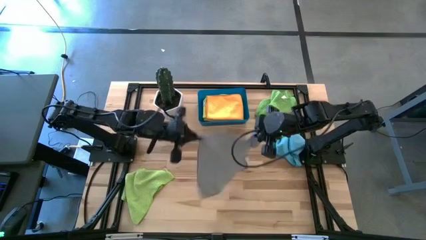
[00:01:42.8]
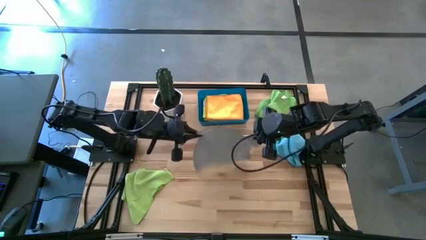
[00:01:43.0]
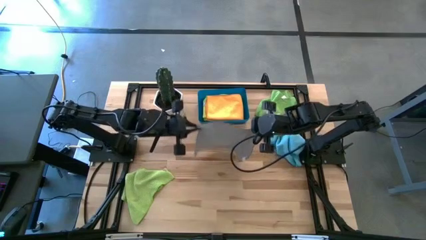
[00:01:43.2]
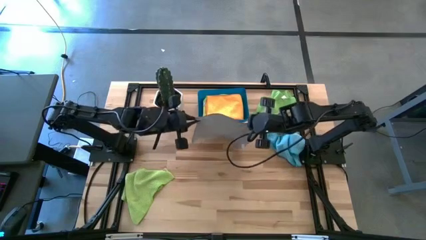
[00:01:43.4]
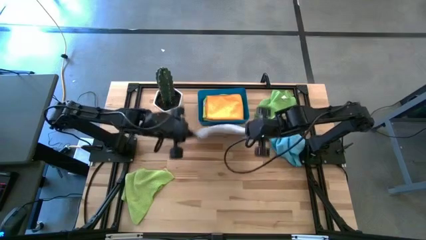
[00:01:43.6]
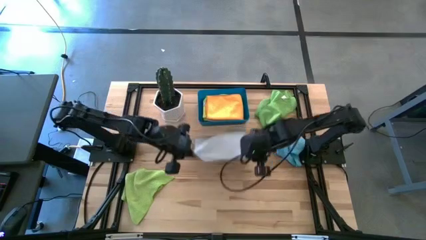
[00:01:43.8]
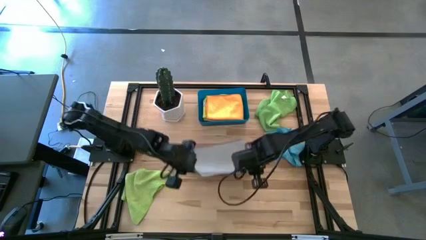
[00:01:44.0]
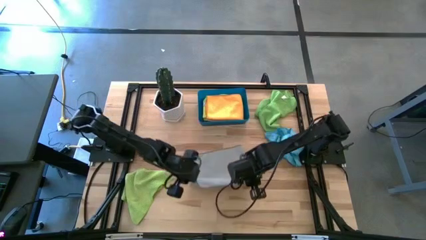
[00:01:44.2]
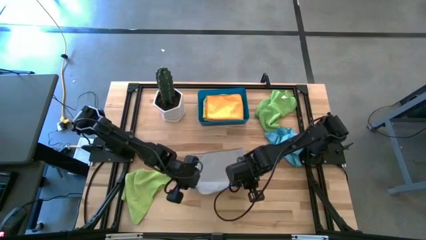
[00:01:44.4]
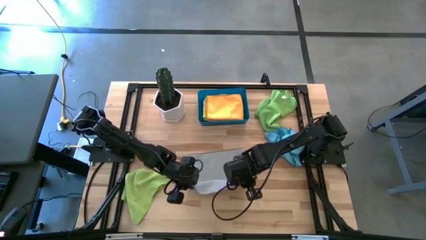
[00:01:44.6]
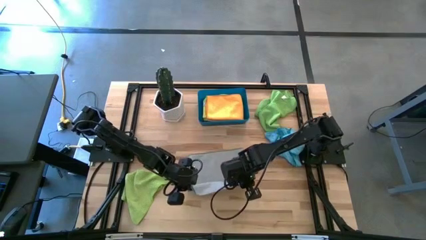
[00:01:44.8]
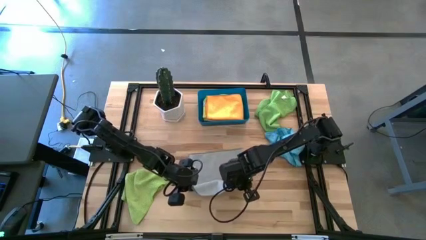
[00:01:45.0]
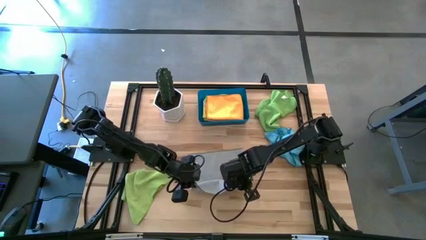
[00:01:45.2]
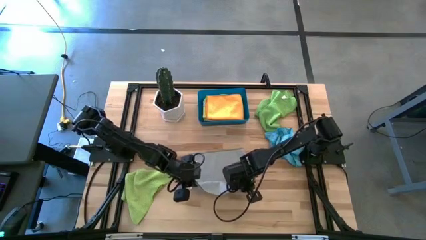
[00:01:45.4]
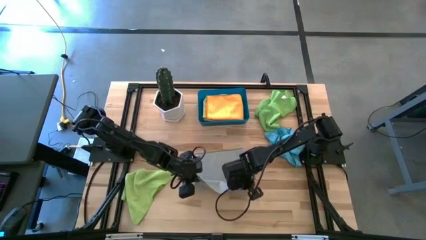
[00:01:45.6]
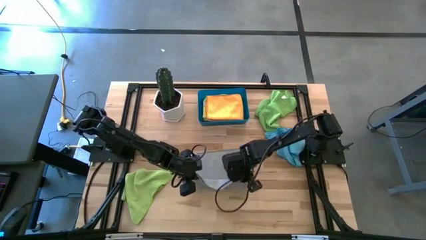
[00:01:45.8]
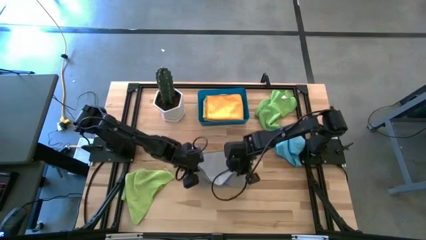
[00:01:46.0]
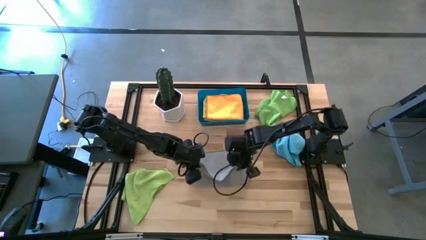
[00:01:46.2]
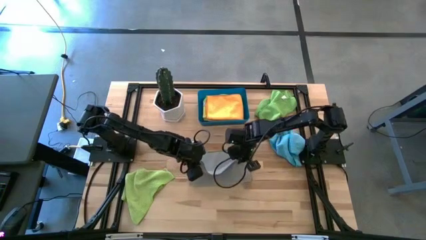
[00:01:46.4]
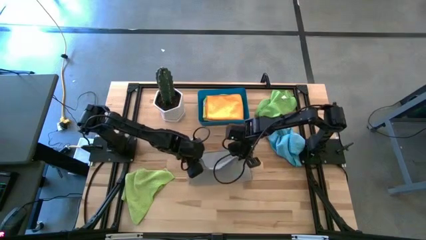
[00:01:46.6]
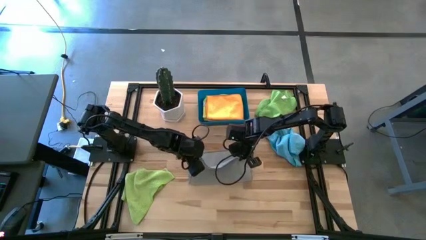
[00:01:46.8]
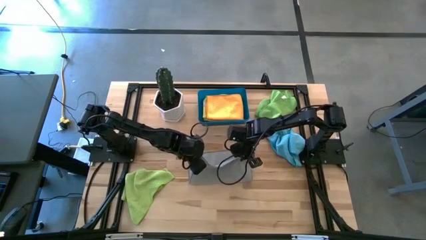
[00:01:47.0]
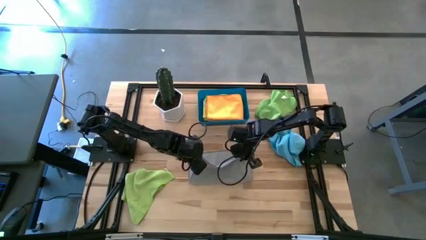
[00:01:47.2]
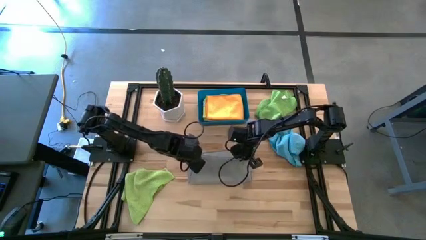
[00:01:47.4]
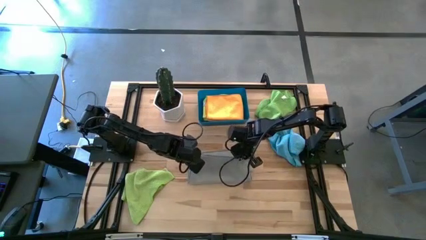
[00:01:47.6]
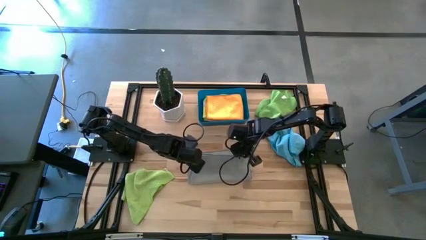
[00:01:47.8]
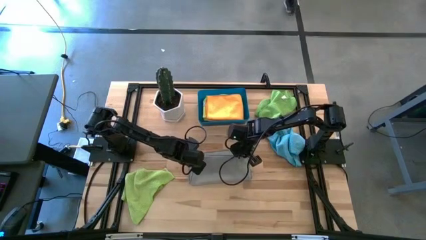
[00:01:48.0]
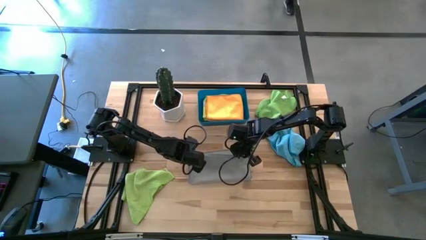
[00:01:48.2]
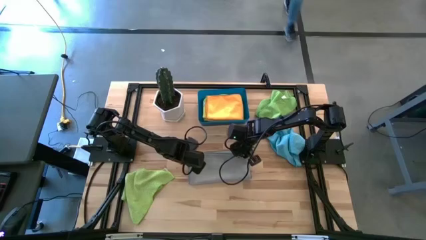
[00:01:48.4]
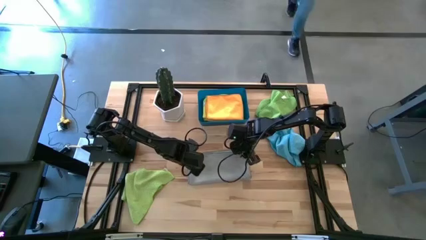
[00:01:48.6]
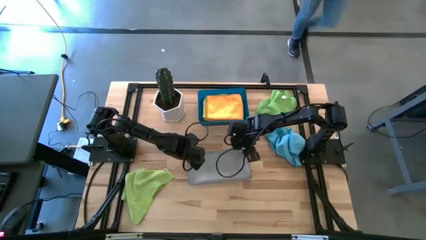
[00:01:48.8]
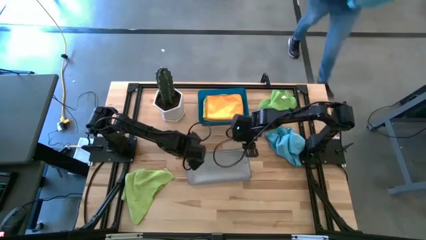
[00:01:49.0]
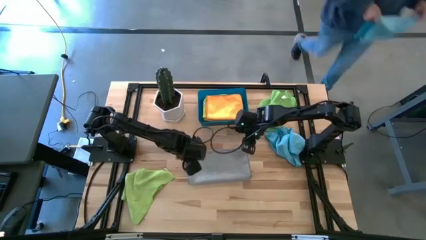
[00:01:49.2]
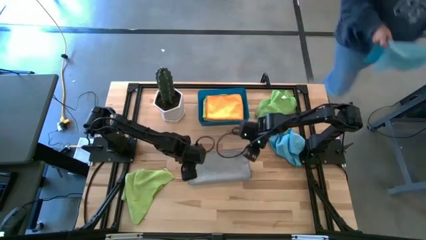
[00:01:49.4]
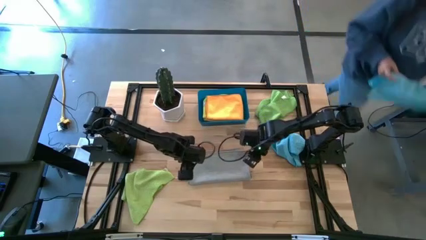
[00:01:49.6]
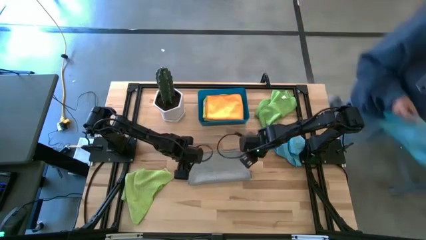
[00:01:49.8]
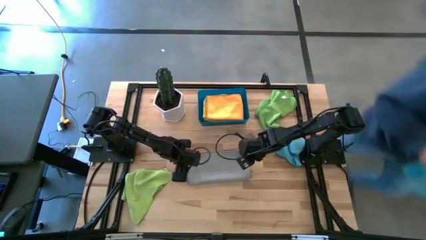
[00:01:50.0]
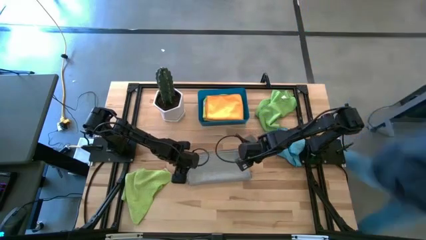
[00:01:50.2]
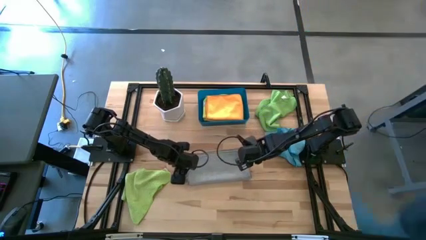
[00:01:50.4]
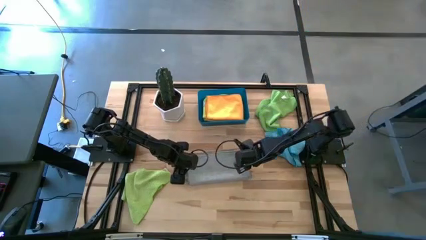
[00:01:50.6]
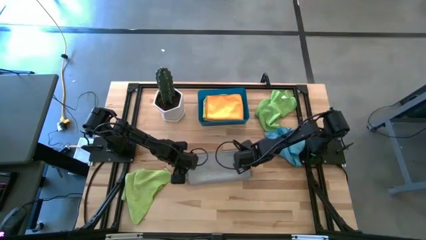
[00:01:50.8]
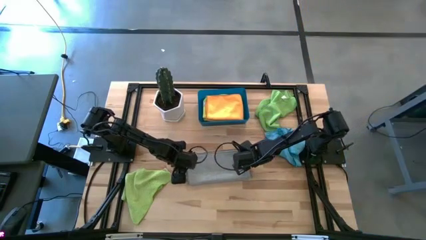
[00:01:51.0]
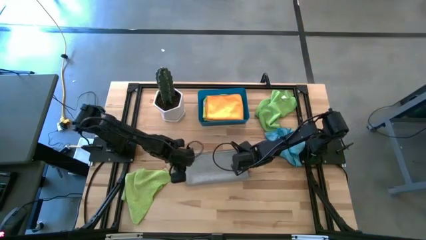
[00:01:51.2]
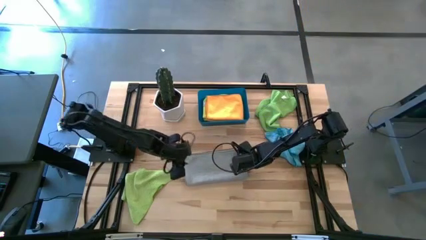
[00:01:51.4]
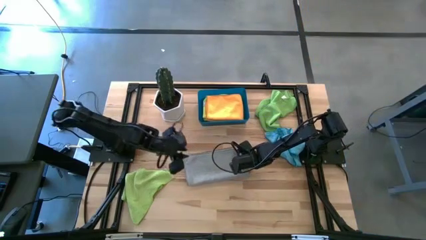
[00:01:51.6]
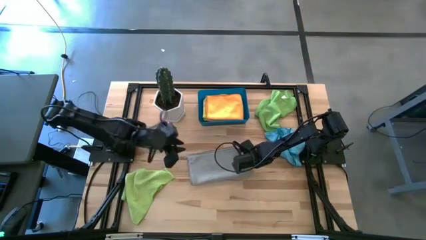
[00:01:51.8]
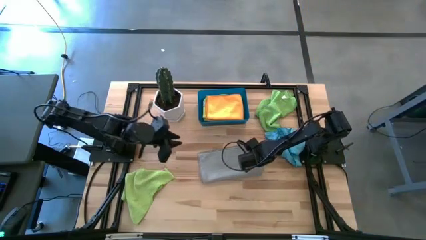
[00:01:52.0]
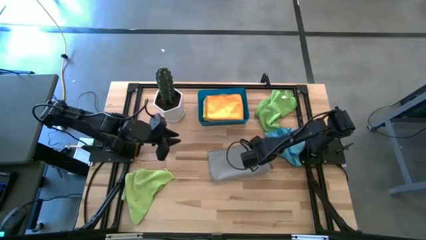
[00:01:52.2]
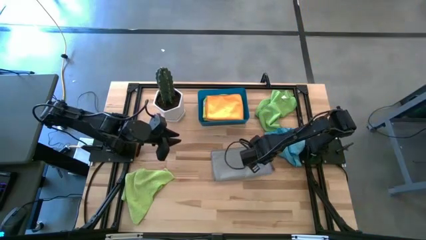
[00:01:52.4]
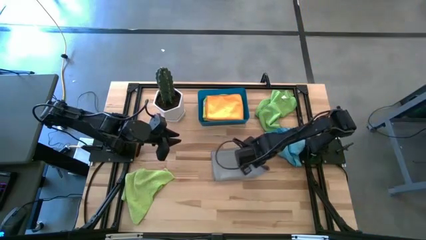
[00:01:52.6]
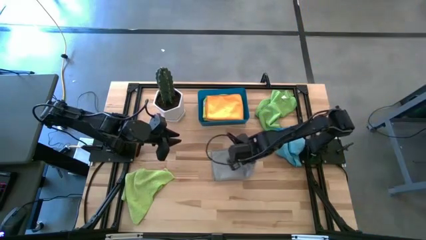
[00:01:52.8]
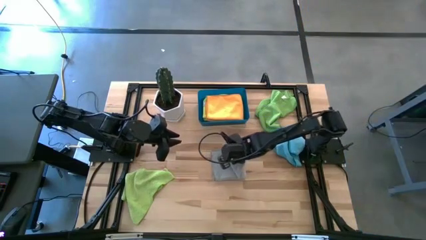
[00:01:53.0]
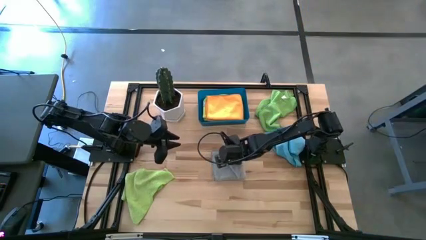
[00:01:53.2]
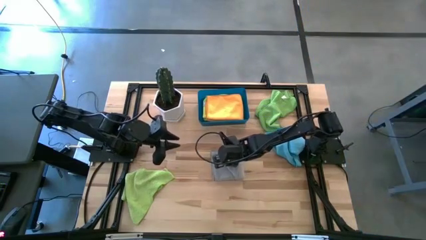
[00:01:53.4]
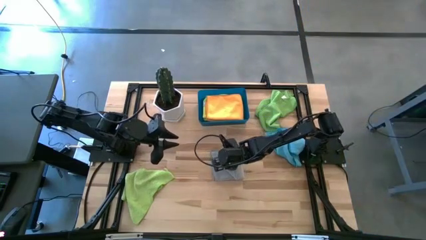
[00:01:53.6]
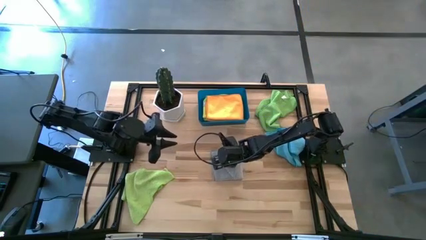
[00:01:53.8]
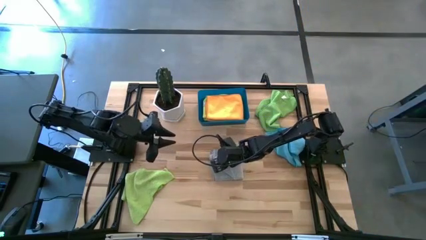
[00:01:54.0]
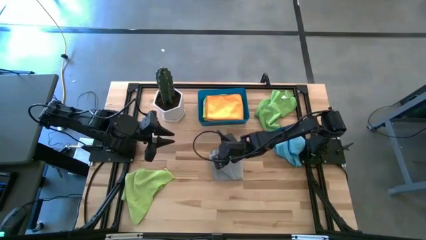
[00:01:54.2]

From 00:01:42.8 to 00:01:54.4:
Task: Fold microfiber towels
Fold the gray microfiber towel

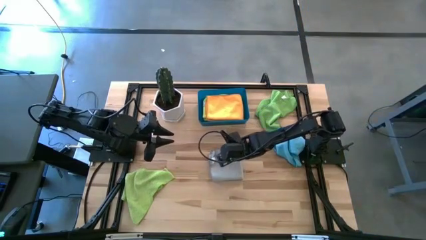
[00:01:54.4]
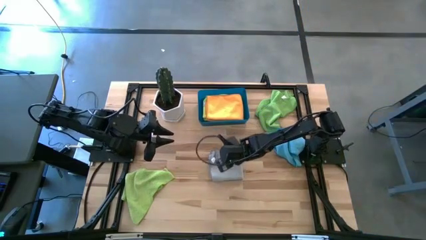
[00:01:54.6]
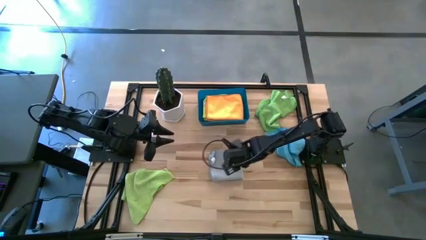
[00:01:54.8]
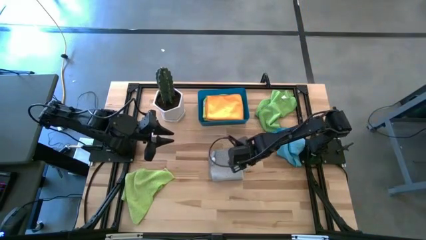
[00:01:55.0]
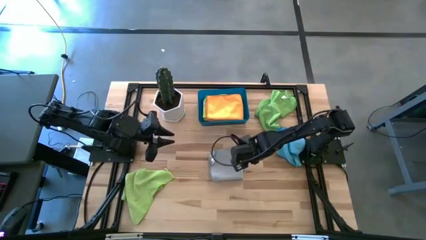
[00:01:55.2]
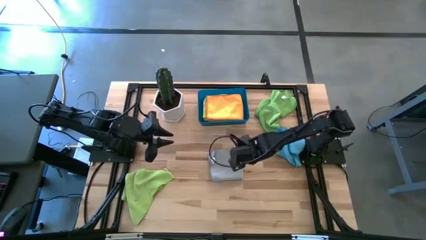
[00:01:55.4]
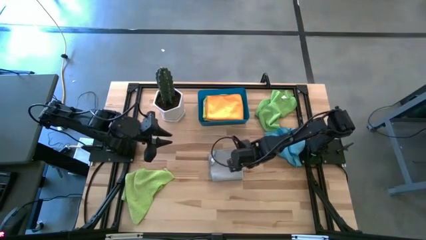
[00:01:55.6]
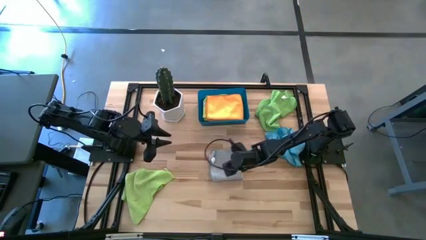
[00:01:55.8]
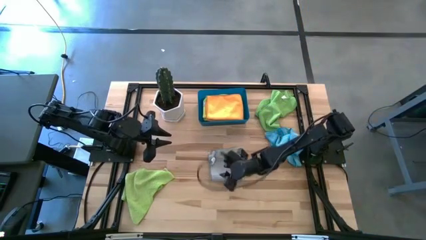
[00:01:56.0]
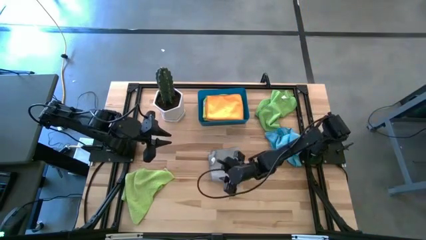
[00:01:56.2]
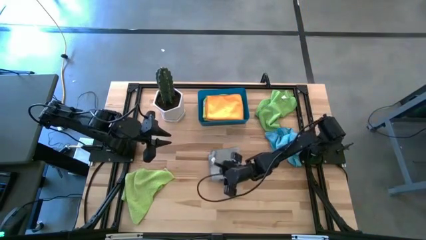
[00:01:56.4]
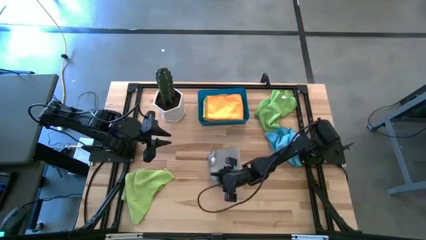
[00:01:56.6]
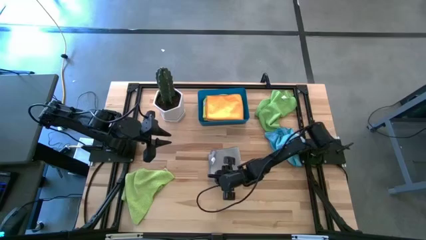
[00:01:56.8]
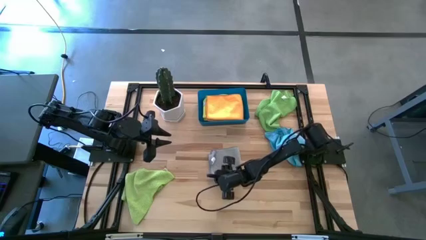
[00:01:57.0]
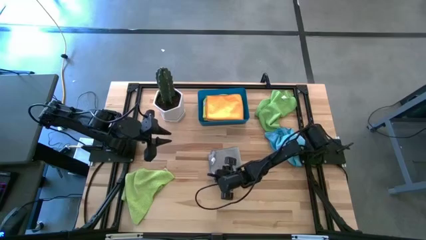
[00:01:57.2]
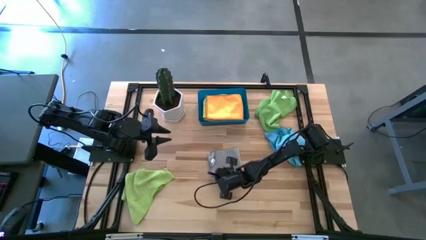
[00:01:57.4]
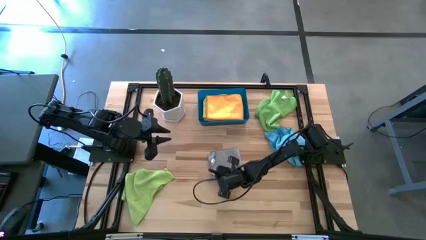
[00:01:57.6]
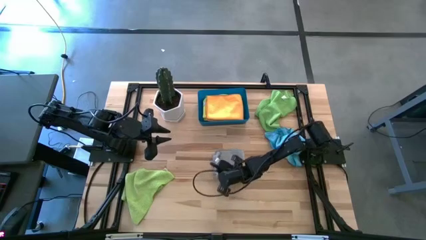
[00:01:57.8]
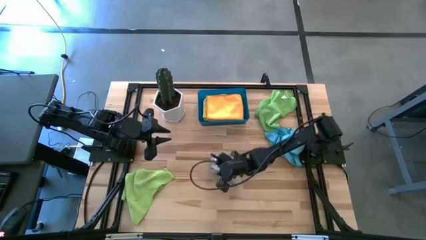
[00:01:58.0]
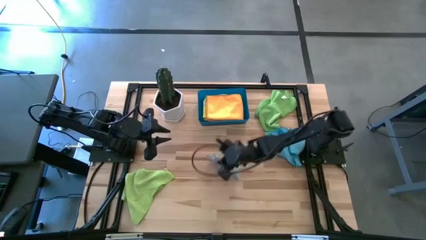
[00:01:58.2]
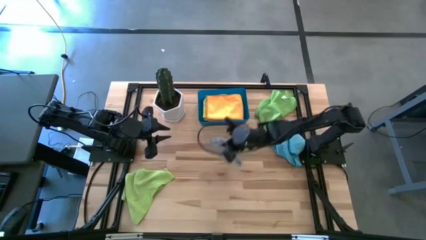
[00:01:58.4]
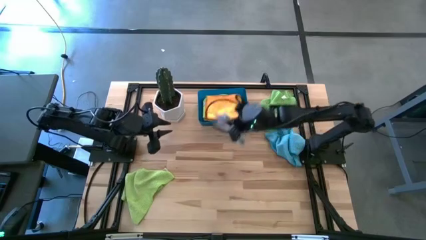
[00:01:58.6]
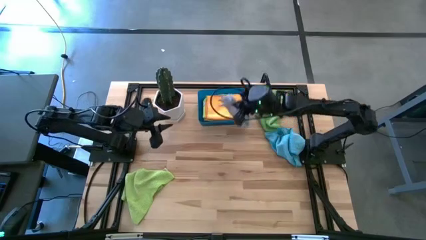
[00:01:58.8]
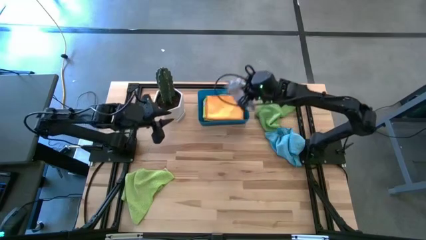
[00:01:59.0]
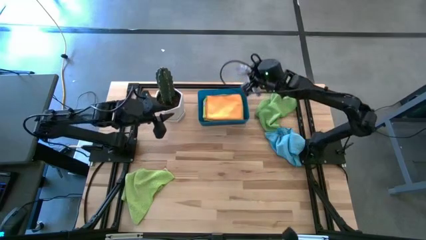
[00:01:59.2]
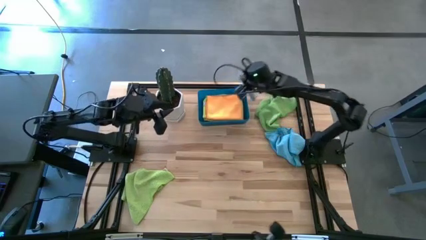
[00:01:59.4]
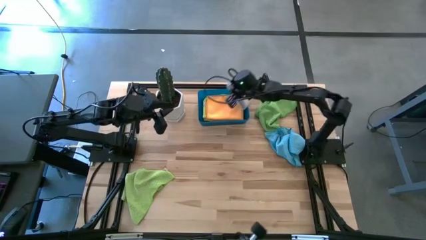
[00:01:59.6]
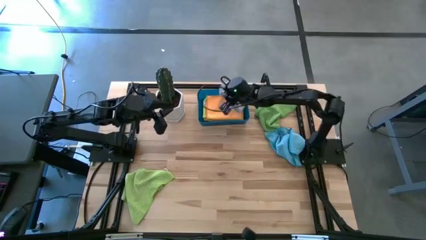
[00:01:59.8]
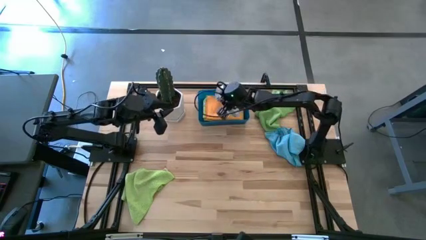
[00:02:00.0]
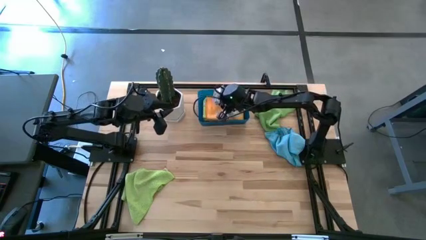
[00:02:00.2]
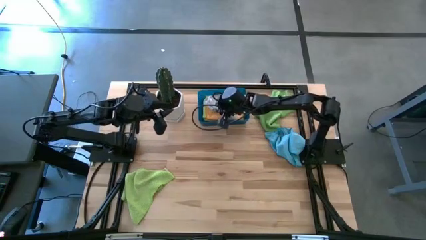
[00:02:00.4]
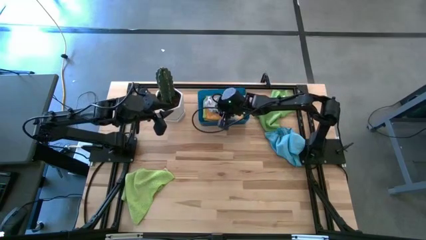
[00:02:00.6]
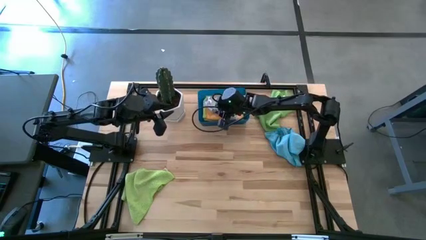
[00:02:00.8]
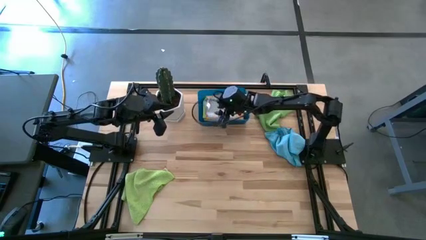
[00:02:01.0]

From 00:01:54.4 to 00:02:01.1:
Stack the gray microfiber towel on top of the orange microfiber towel
